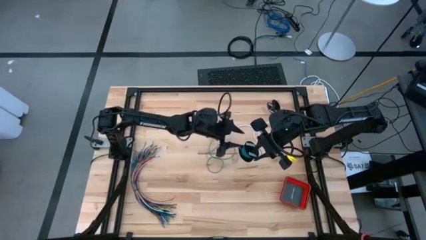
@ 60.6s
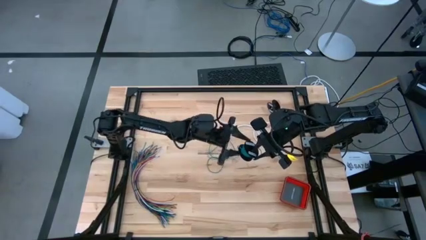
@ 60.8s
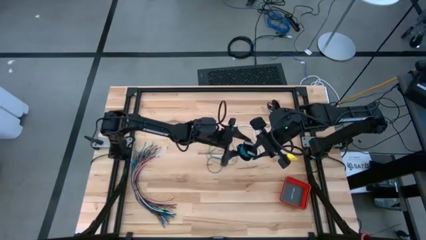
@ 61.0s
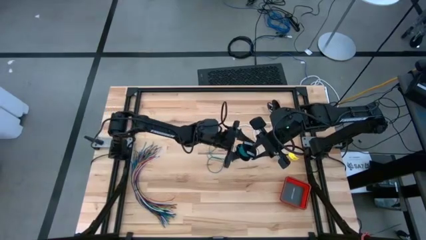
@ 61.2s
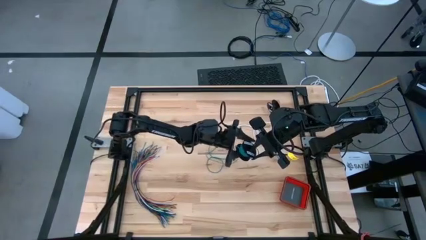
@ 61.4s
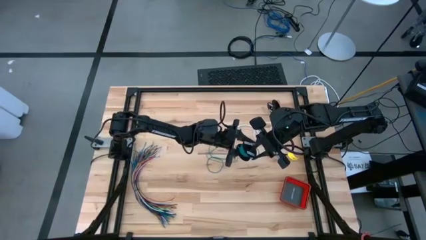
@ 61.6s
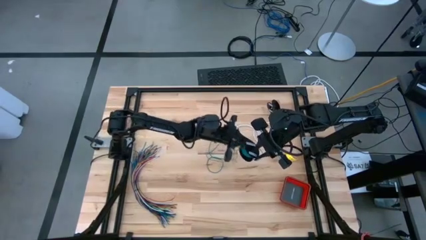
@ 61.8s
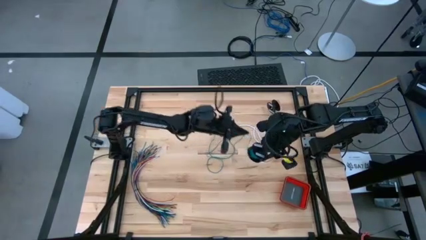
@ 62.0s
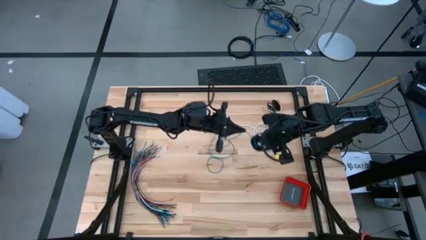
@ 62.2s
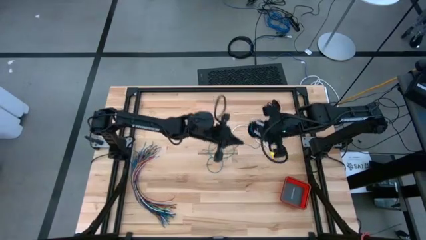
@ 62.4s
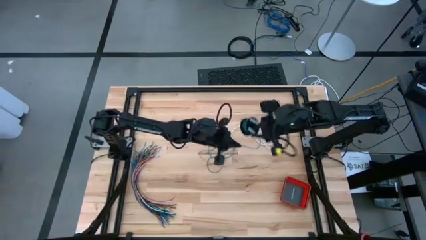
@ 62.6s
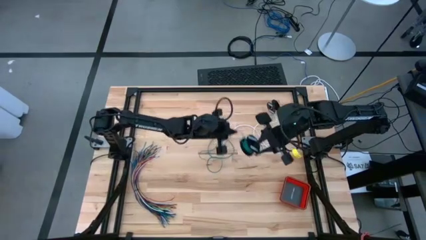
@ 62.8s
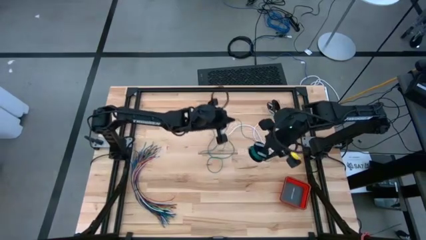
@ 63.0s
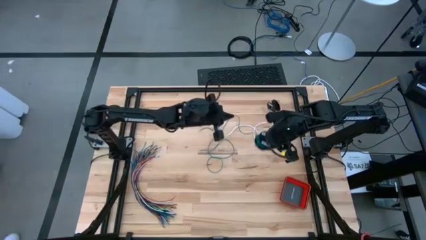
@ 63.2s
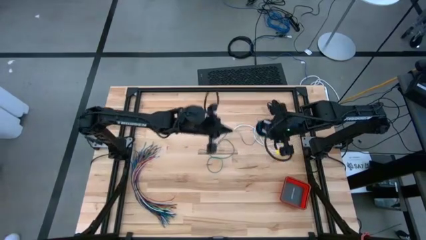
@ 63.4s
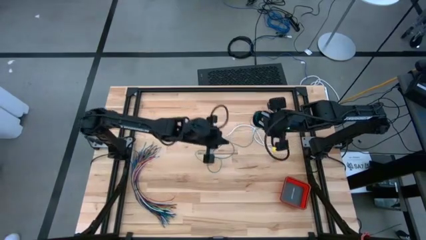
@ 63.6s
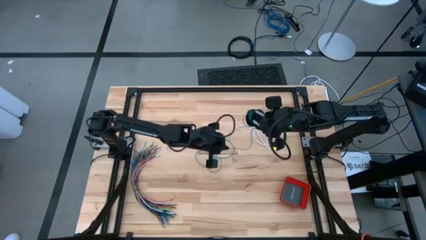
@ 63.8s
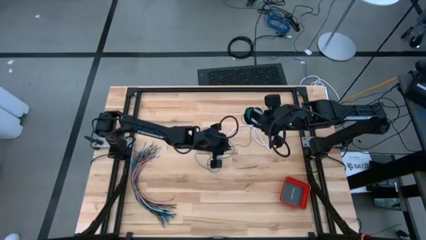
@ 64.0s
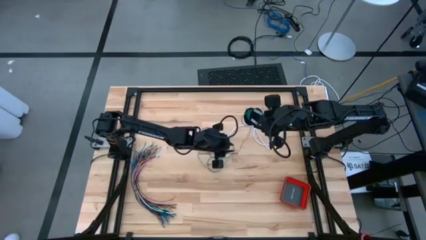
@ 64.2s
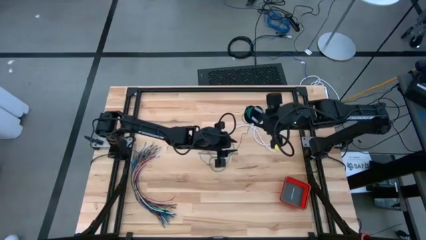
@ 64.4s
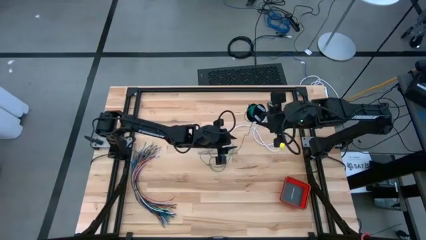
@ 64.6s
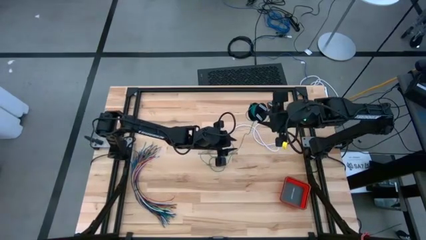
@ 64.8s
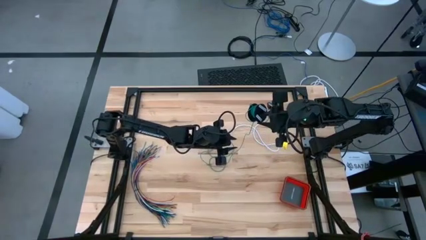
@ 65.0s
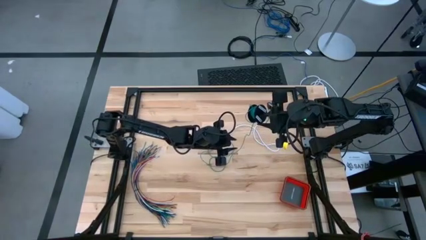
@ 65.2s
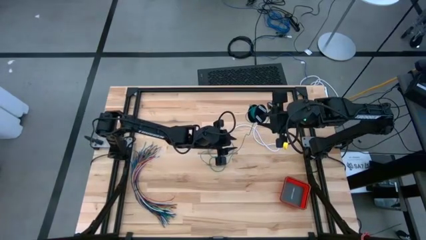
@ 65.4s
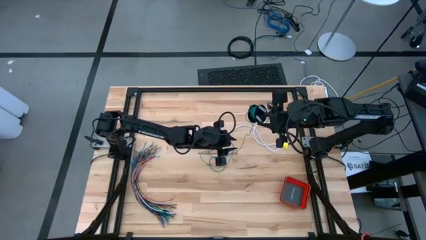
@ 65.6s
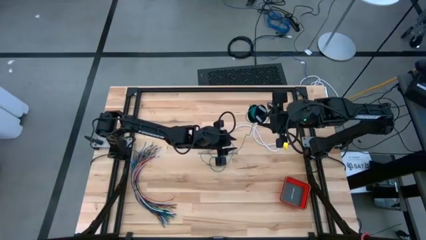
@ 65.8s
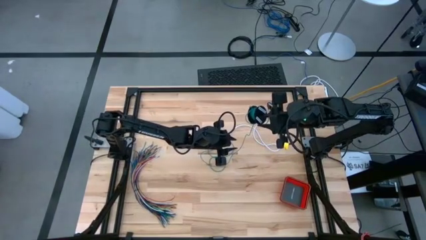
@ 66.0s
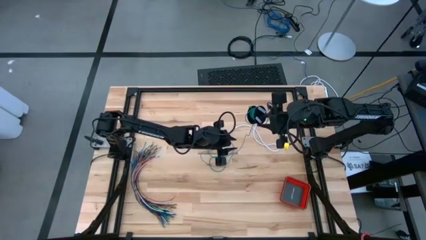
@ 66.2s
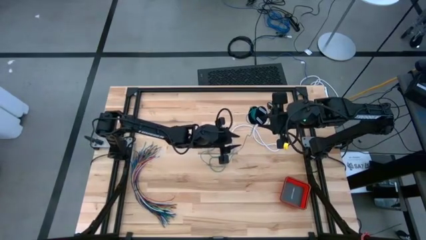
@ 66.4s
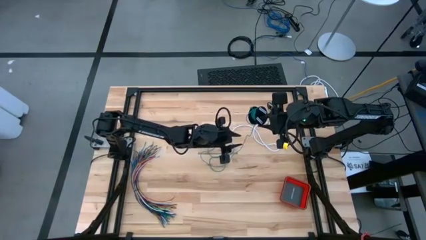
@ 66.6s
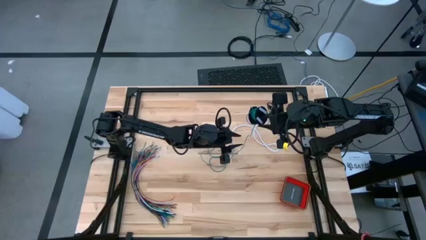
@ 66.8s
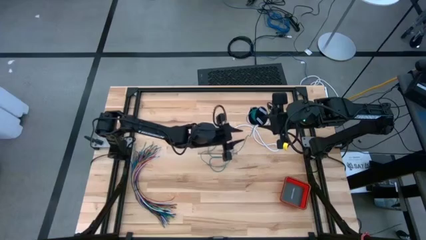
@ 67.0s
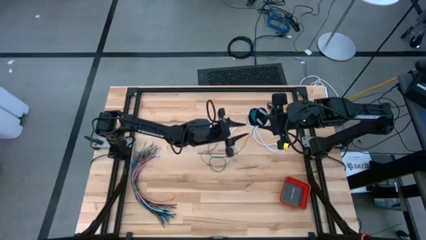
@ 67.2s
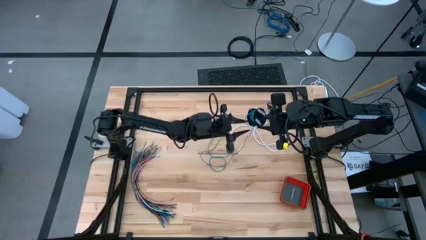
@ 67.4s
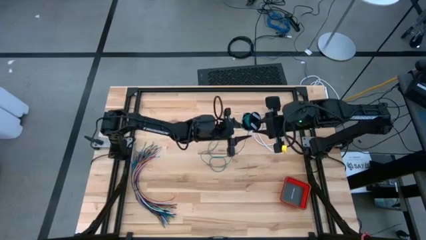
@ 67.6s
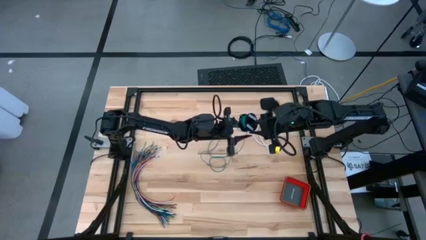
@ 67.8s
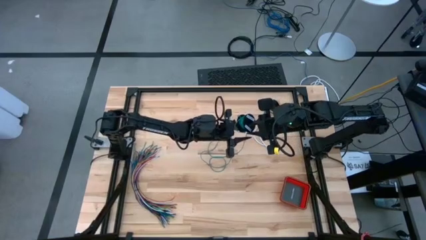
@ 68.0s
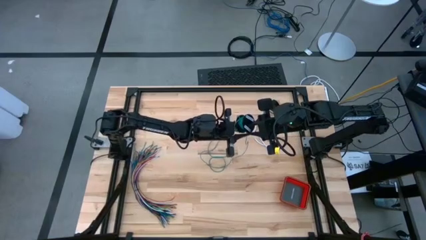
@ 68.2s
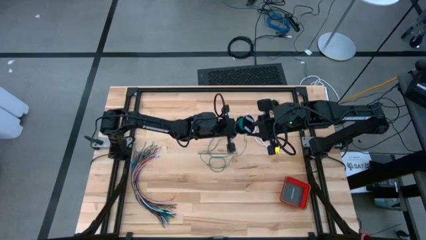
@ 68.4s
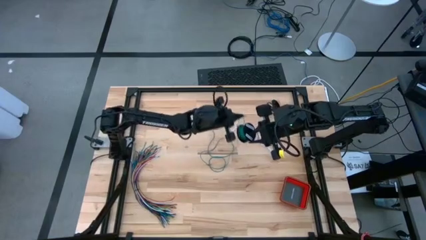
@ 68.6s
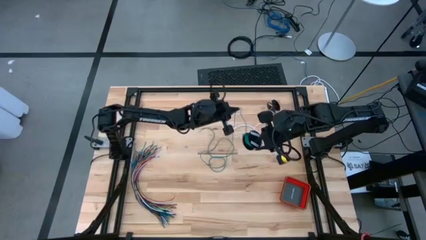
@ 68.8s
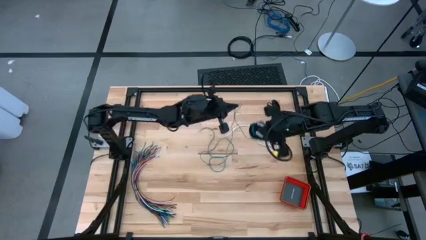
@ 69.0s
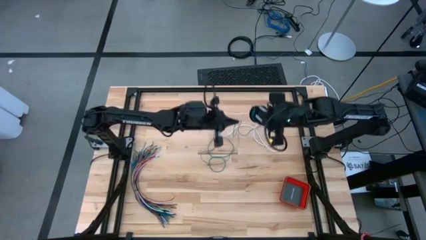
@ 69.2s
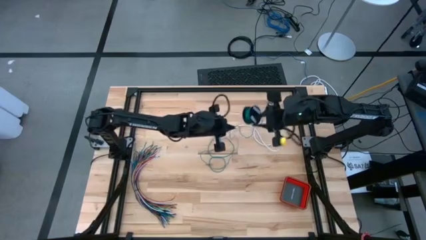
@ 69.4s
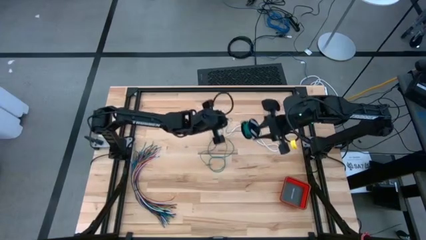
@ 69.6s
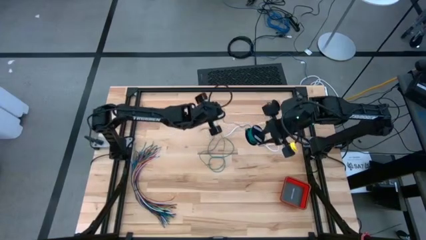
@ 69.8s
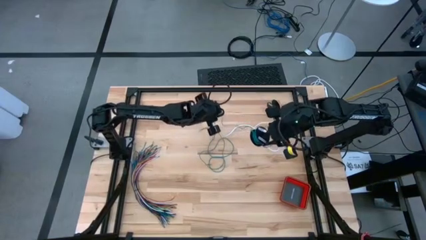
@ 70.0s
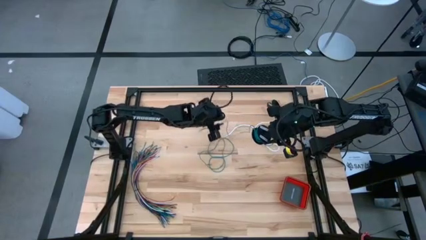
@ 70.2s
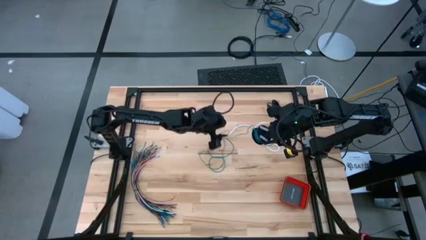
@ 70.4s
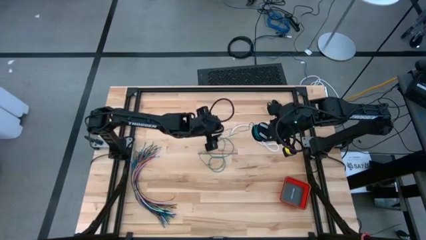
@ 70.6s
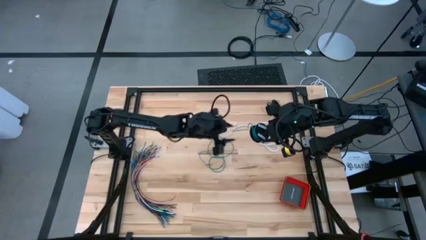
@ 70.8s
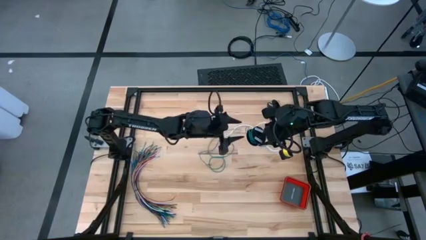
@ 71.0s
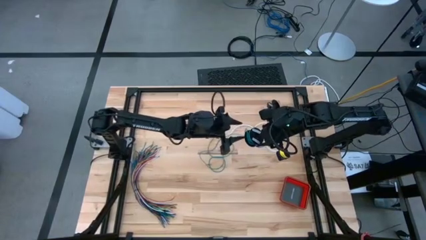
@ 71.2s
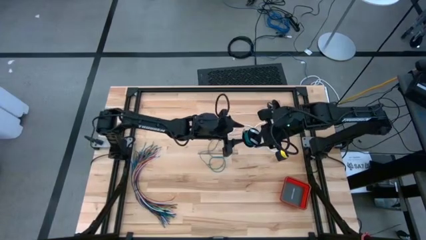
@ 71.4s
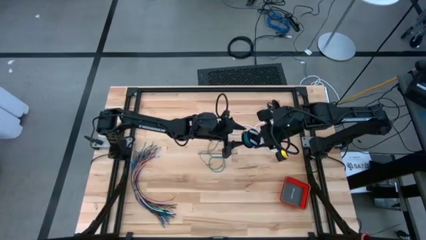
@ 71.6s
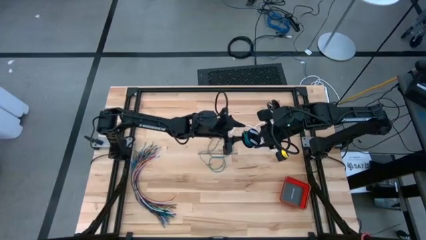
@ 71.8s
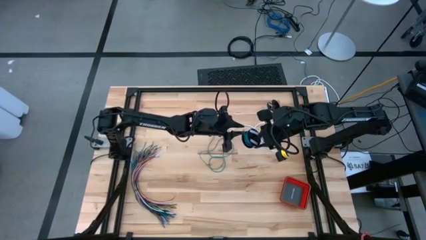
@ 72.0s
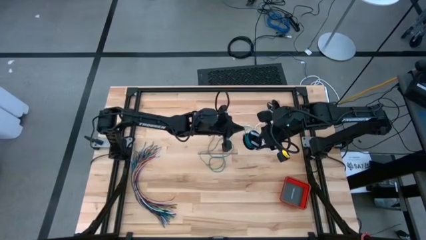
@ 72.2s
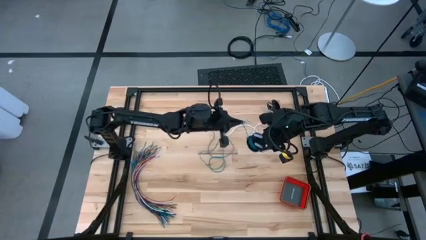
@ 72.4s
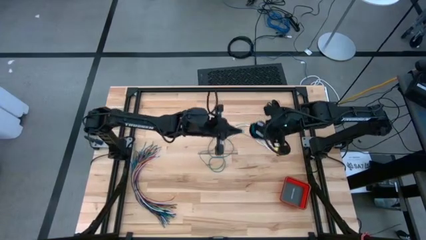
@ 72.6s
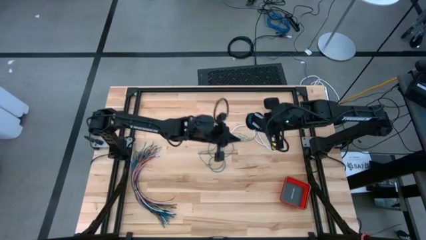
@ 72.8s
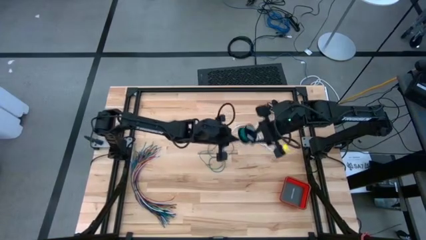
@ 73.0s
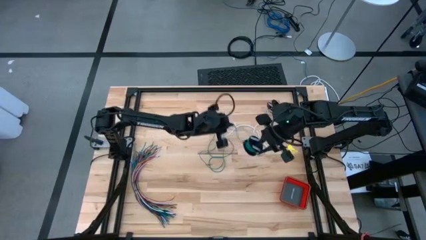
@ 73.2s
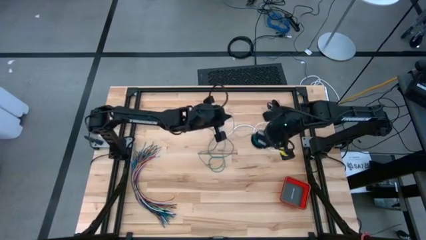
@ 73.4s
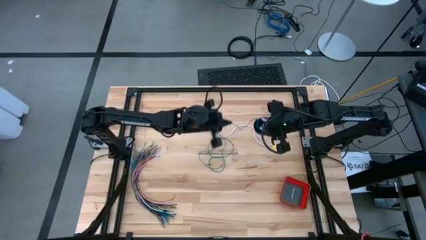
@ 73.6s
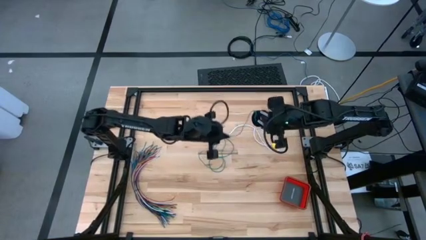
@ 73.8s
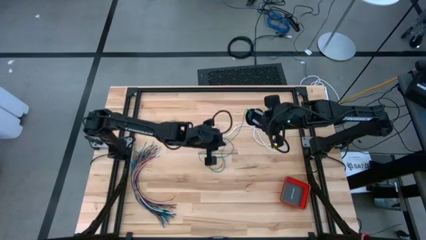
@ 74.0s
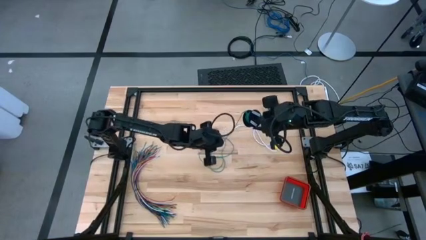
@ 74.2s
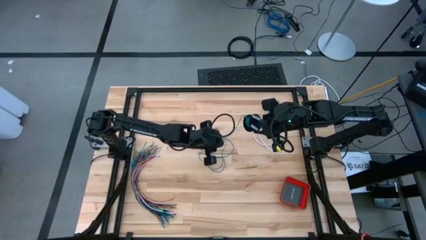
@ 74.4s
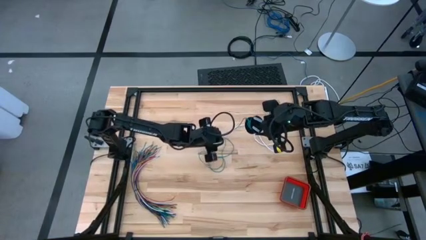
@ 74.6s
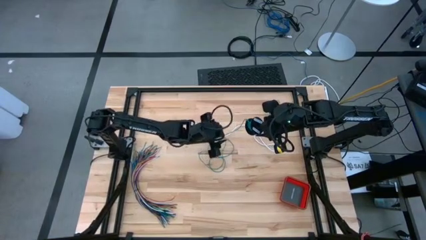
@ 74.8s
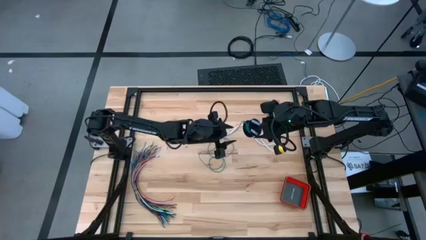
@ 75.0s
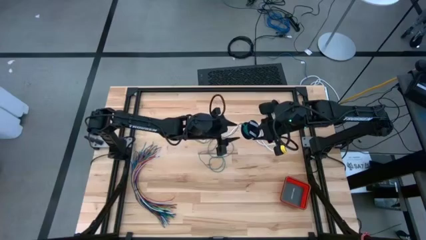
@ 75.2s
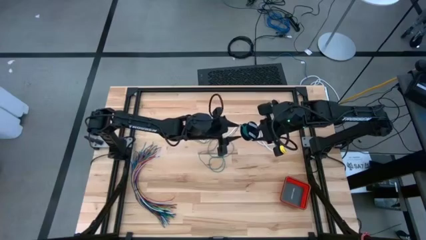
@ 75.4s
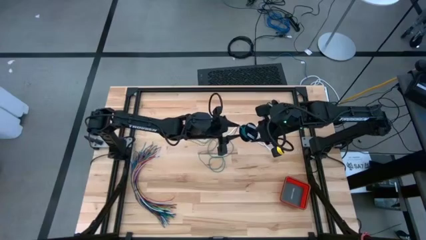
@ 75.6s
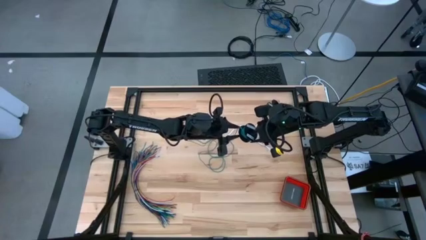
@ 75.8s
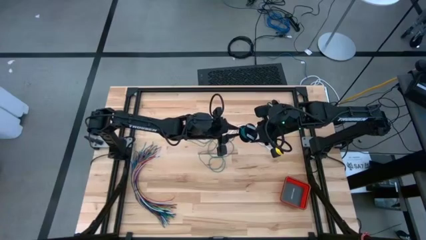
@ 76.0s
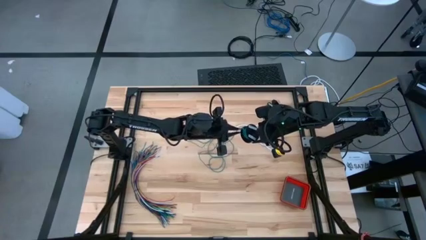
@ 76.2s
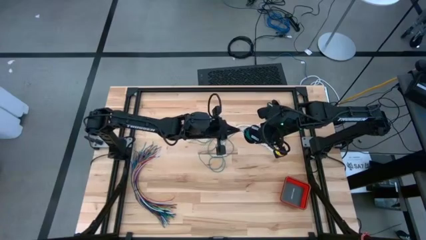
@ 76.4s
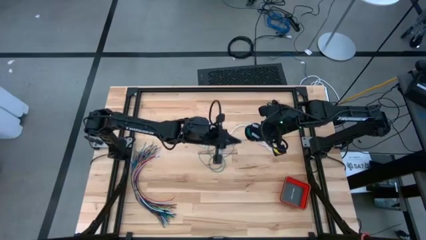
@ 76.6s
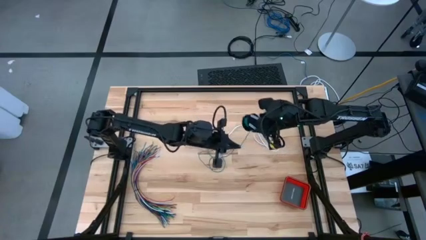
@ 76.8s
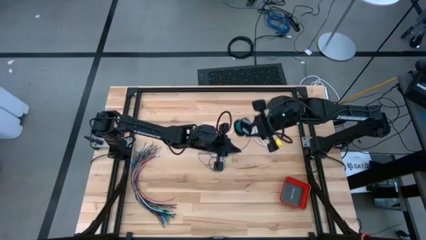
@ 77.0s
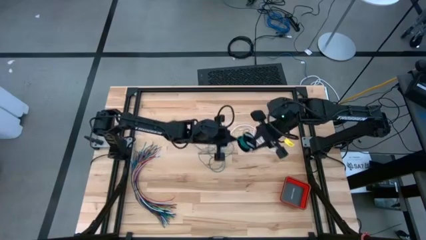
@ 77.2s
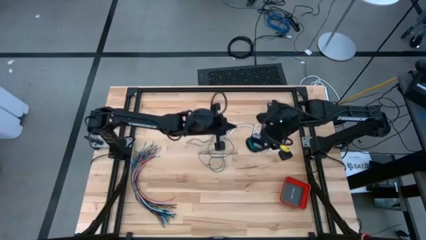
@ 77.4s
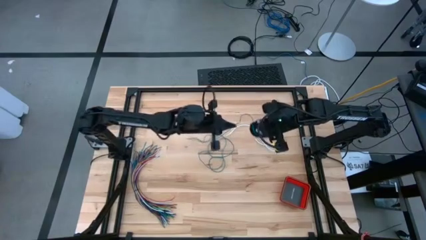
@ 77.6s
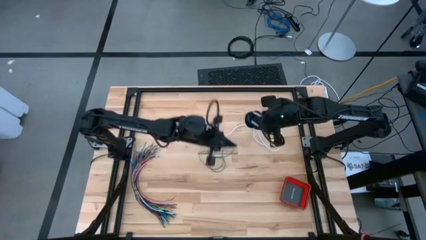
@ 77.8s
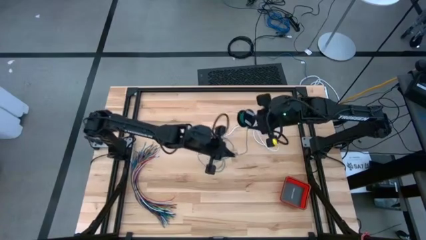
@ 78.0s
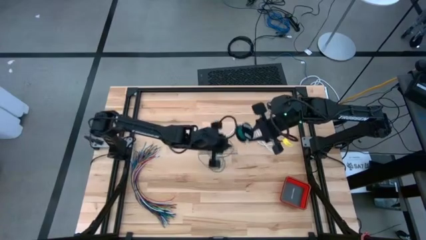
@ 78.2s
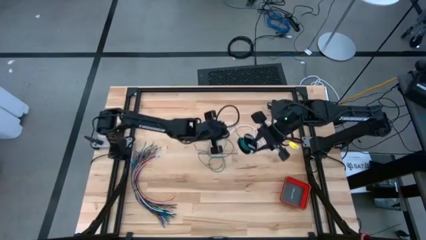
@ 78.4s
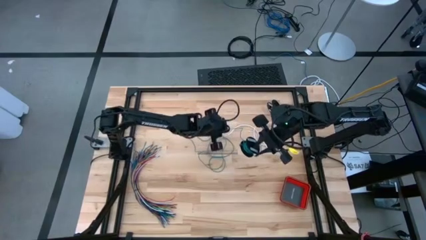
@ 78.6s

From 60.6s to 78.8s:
Task: Coil cords
Uncoil the green wire from the spool
